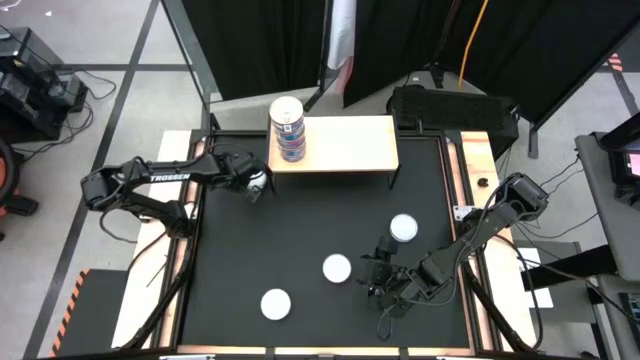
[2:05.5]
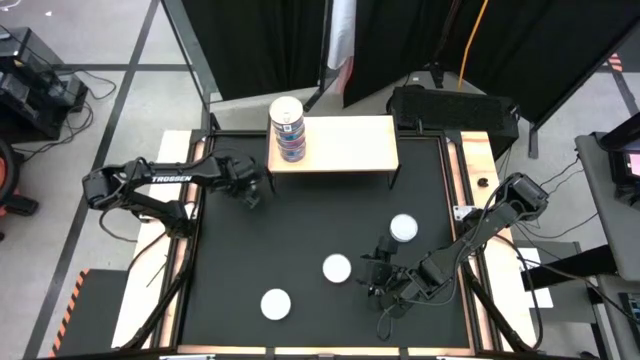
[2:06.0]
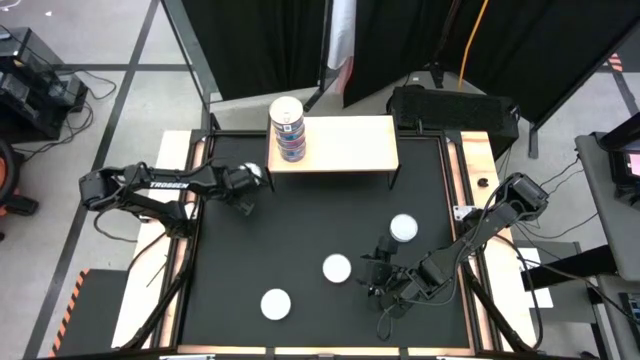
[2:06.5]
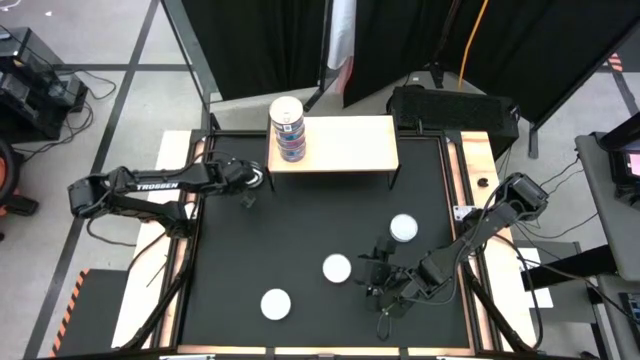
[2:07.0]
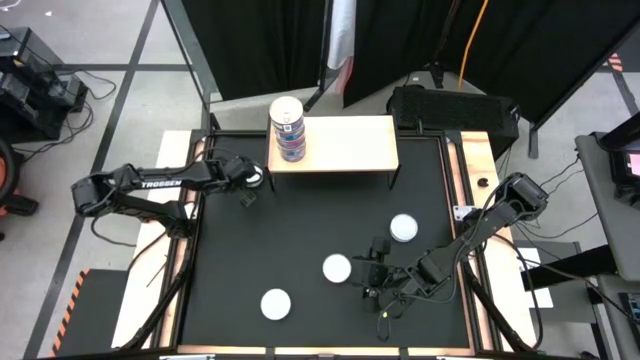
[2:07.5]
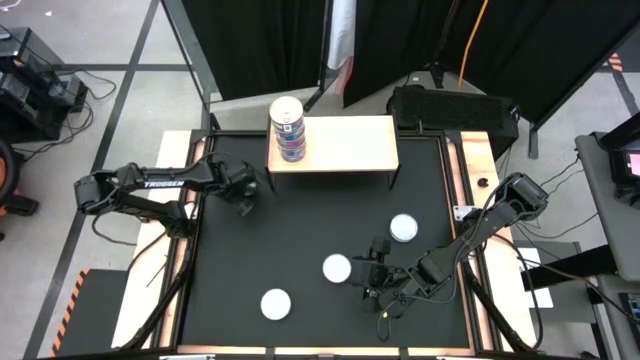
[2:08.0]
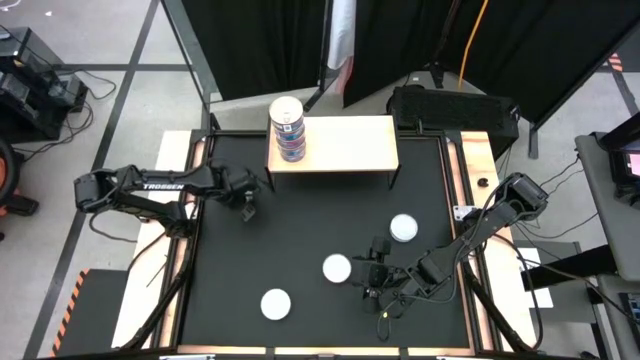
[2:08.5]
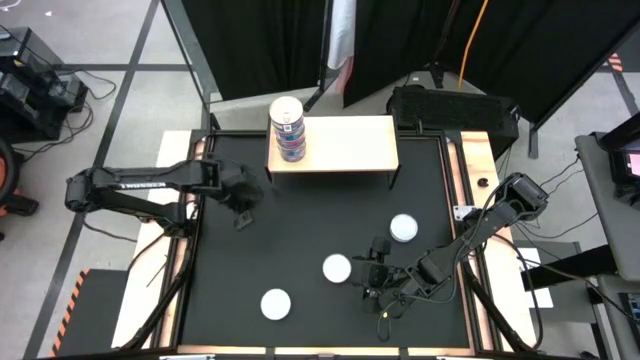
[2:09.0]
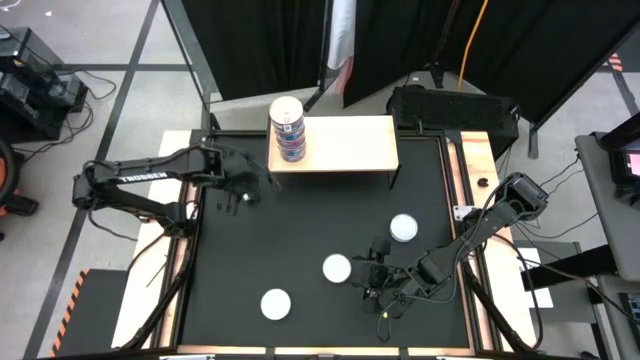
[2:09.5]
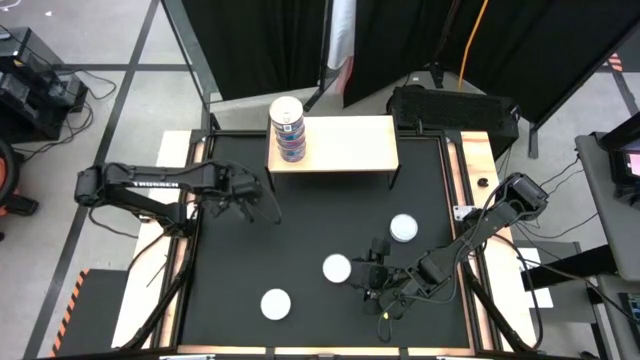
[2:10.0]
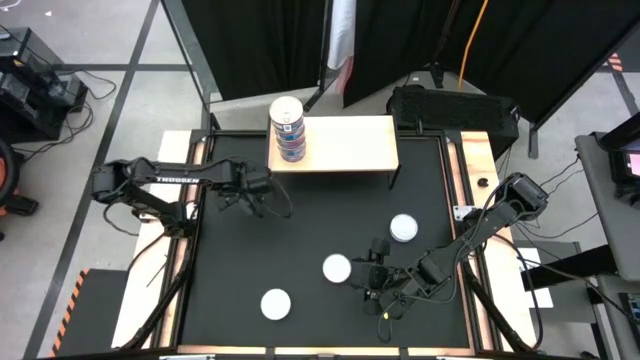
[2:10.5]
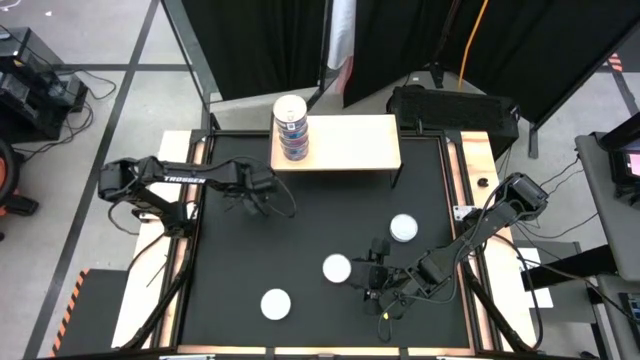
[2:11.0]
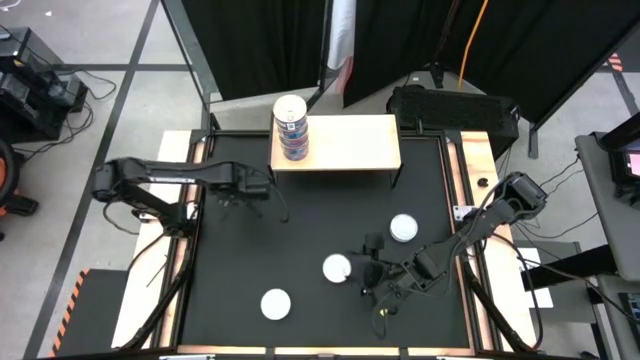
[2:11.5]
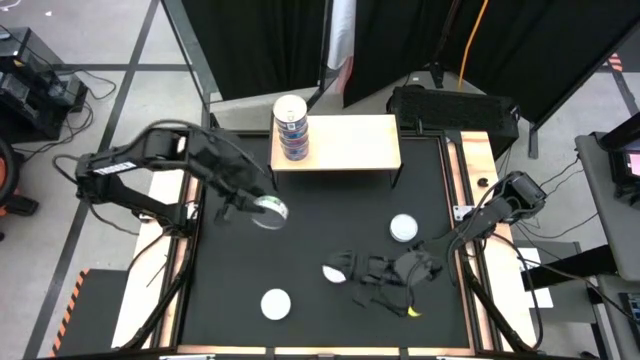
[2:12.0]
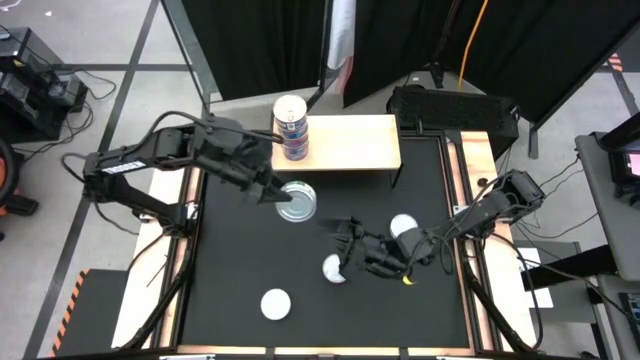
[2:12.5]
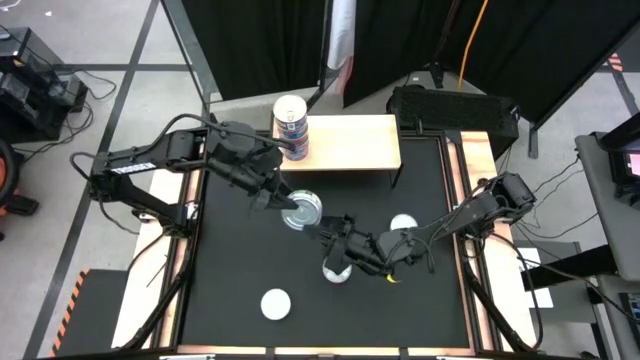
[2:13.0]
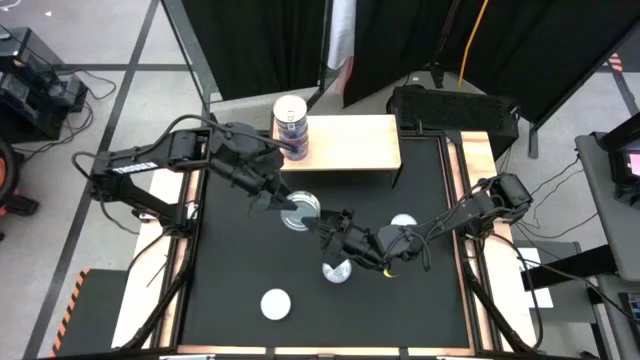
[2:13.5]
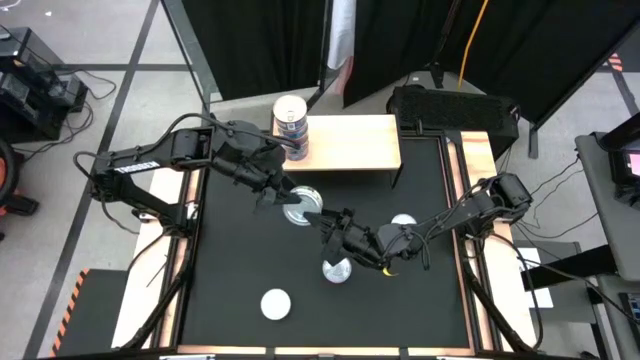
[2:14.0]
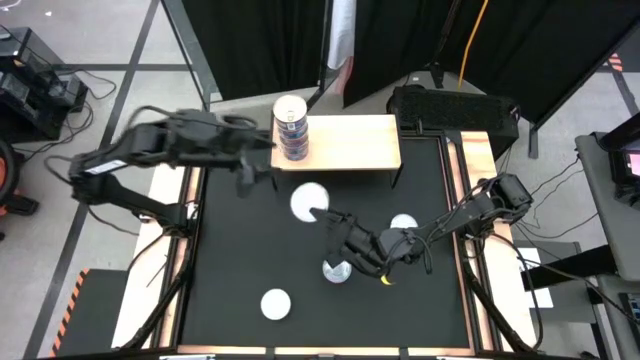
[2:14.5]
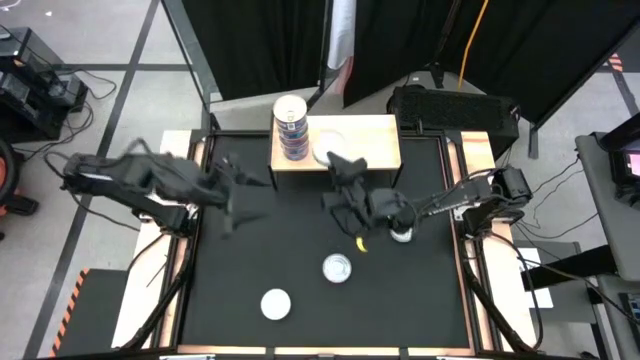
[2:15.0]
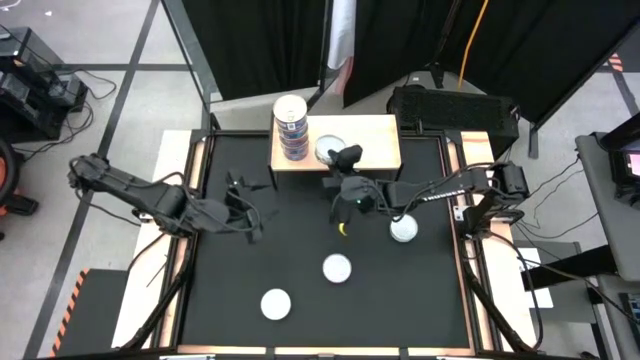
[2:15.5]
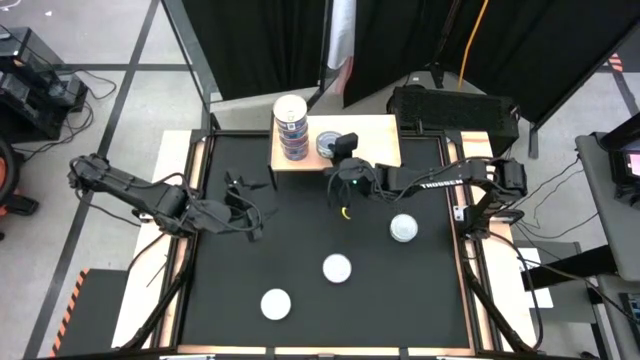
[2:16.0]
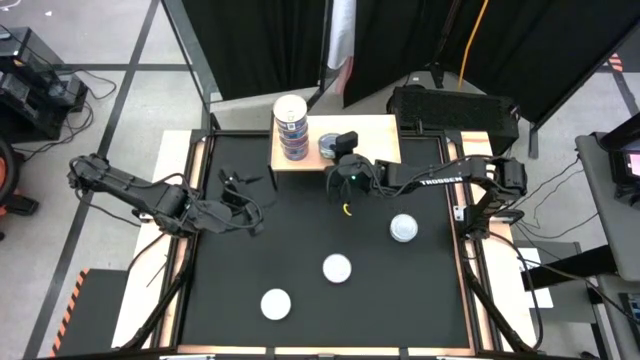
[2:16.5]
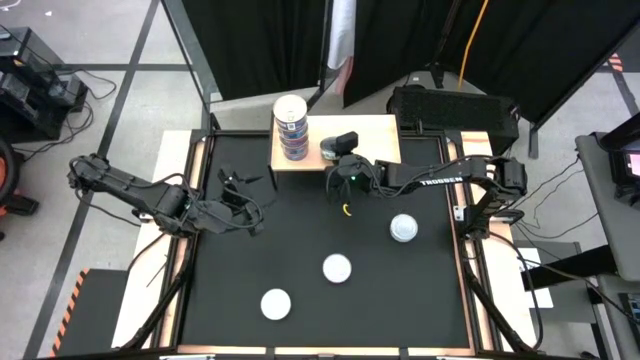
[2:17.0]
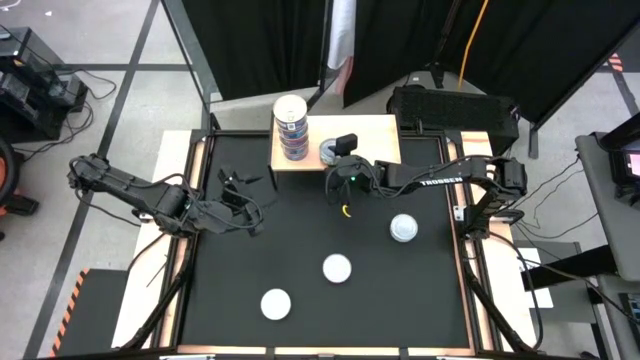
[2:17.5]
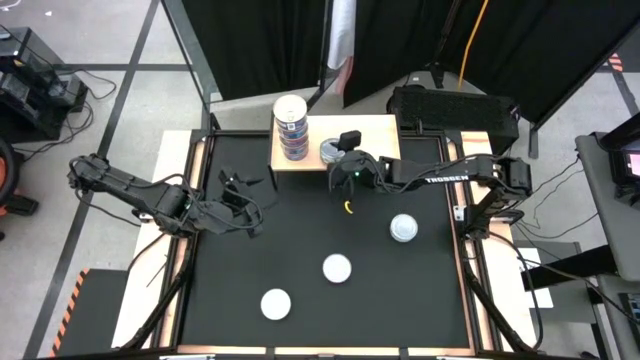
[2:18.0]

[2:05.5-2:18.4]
Task: Stack canned seafood by type on shelf
Put the green tuna can on the shelf

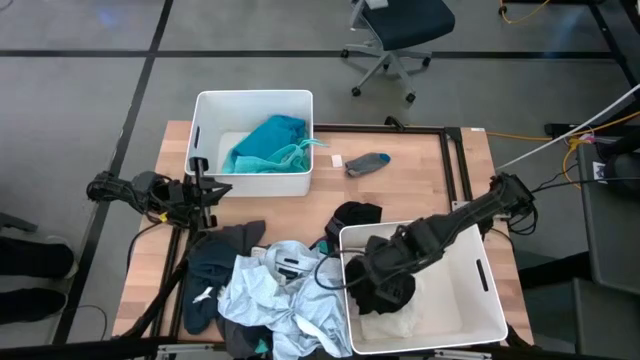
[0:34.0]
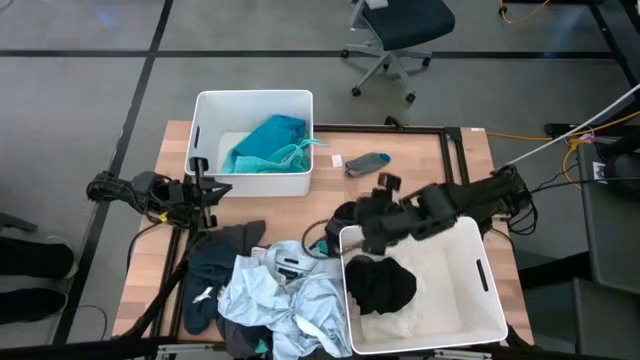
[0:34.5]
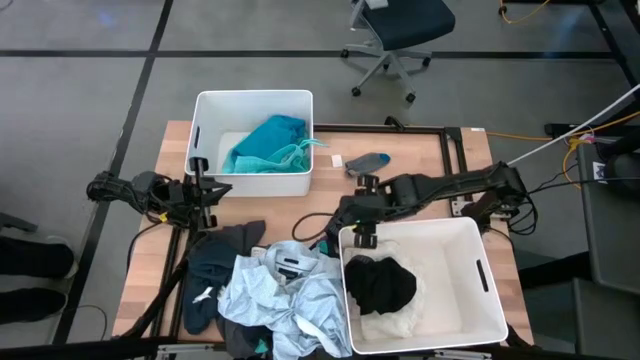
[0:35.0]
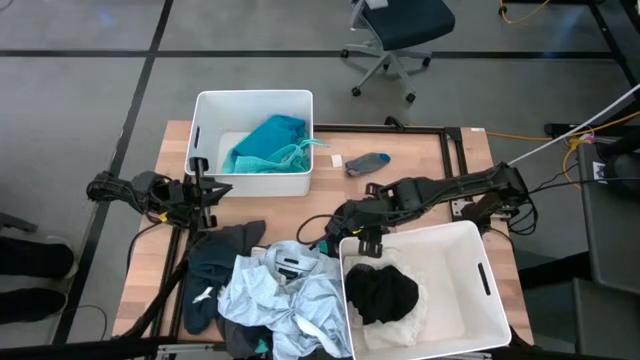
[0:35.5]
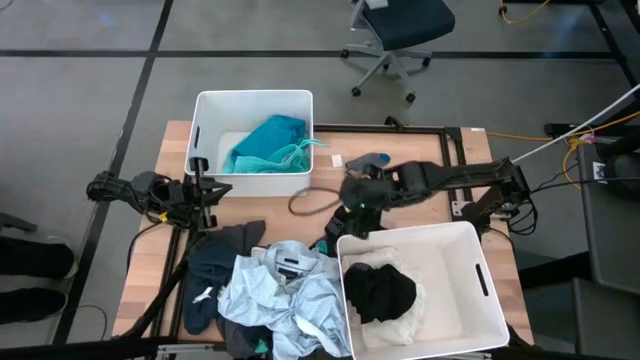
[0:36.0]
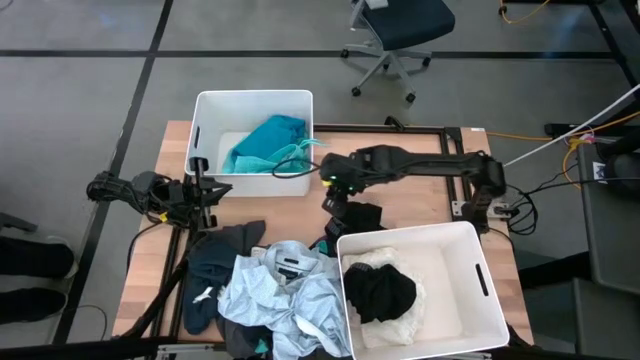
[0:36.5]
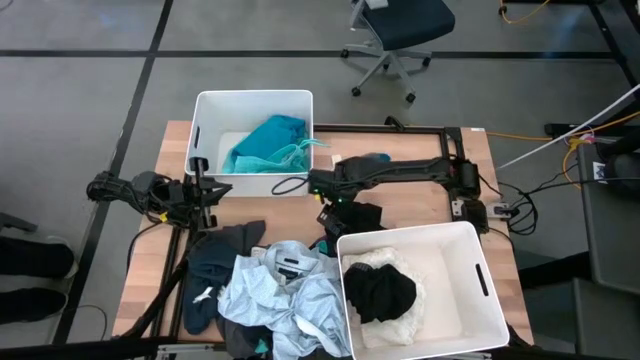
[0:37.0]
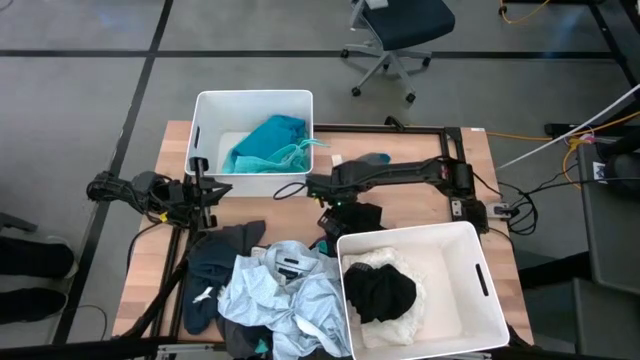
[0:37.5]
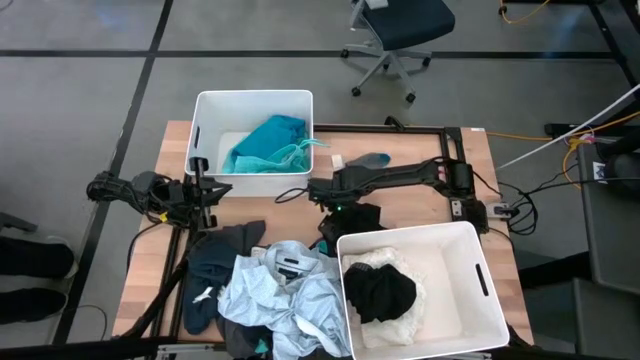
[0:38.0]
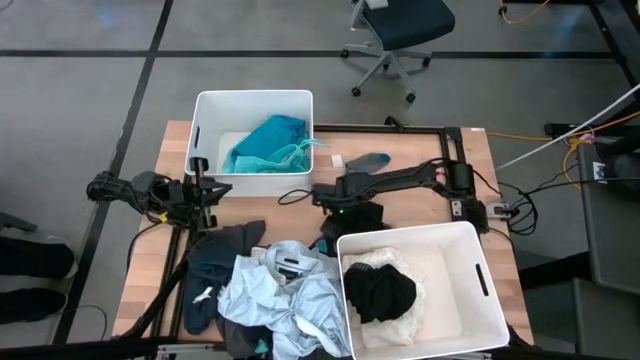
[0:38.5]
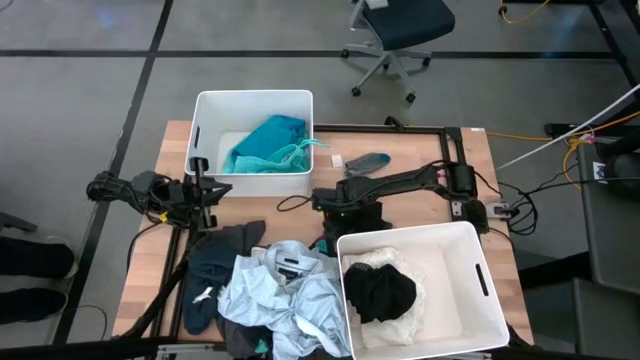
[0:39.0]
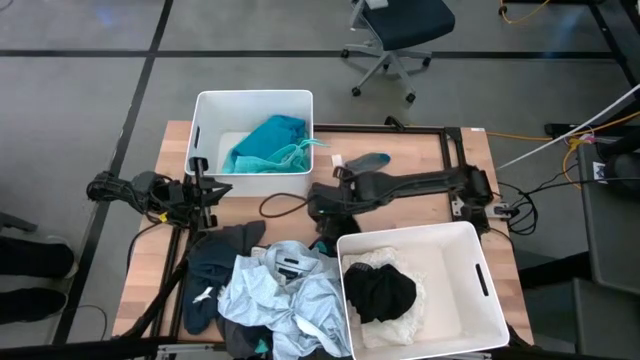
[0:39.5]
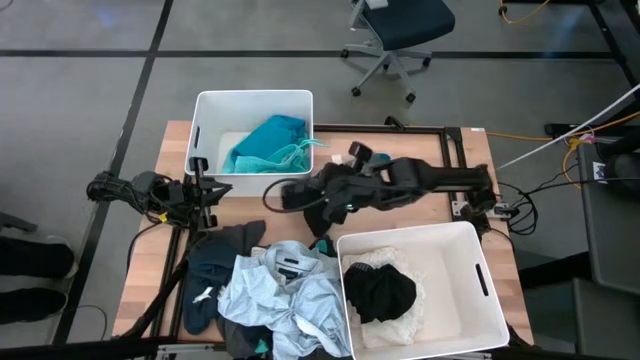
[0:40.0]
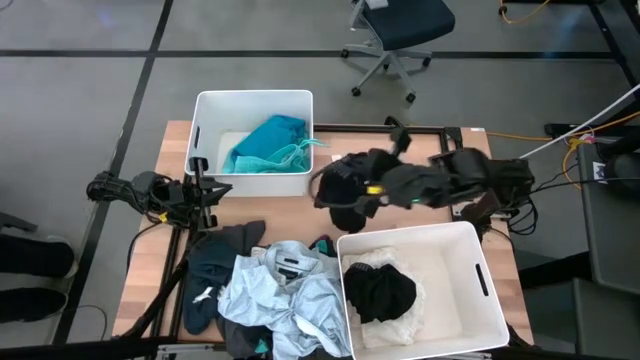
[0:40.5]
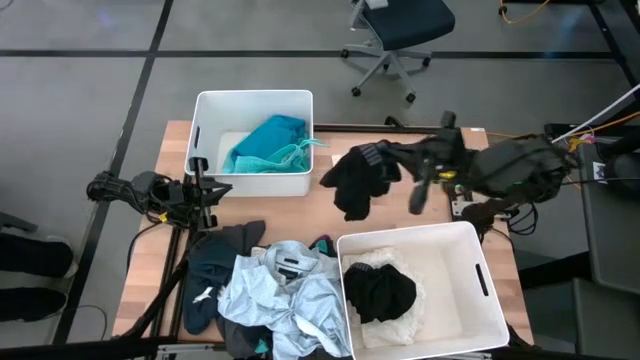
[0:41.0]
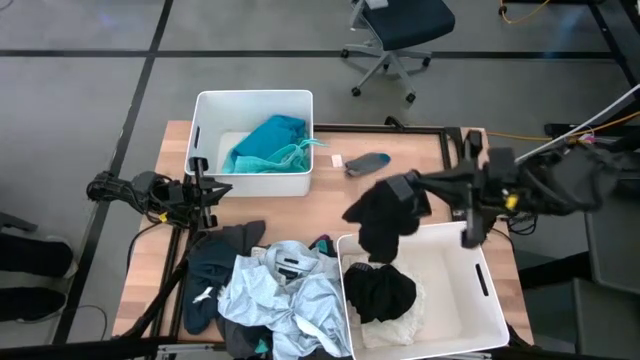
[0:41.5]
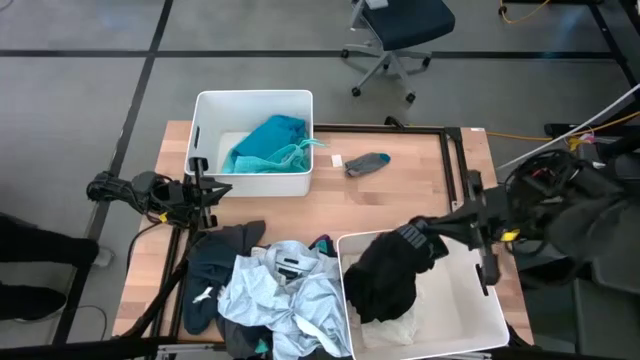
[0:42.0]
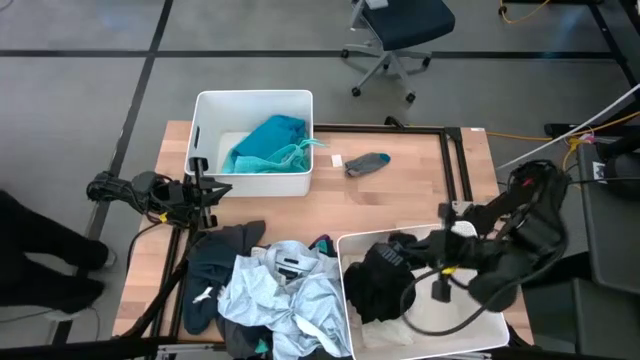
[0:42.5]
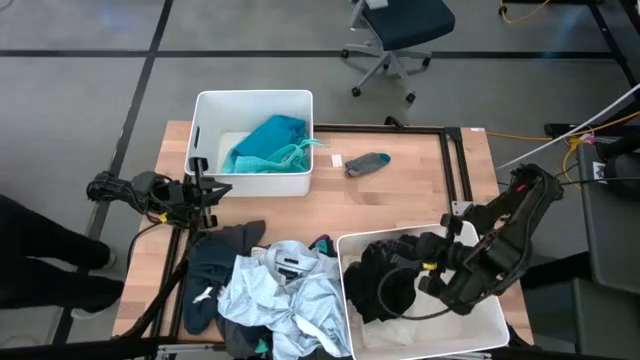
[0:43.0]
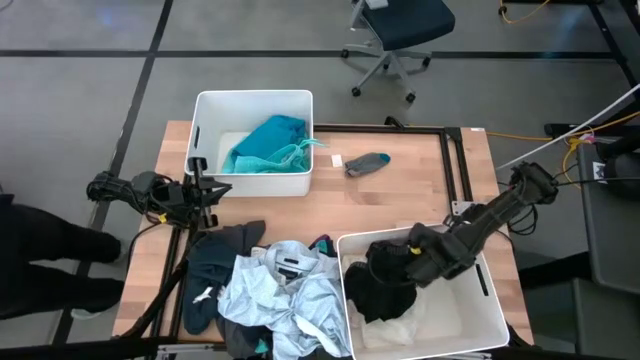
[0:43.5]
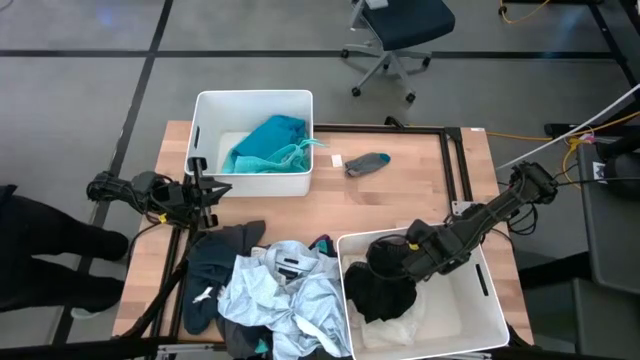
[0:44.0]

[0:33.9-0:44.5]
Task: Sort clothes
Put the black underwear into the bottom white laundry bin
